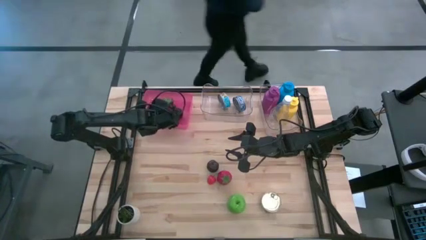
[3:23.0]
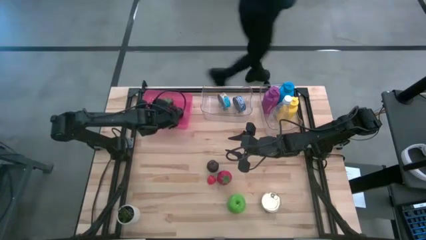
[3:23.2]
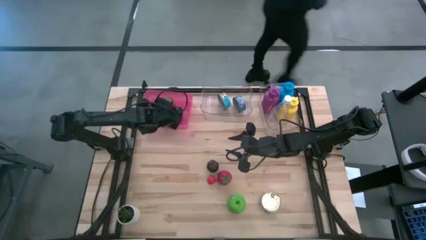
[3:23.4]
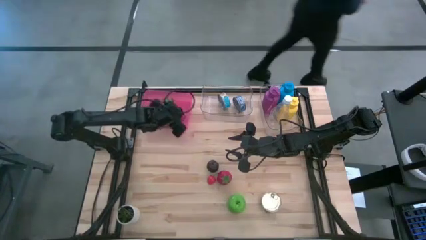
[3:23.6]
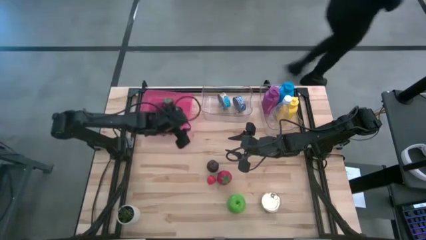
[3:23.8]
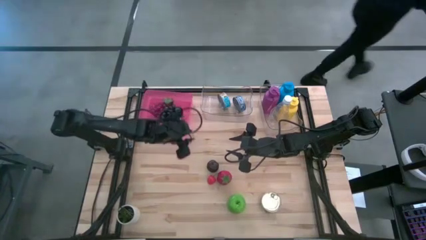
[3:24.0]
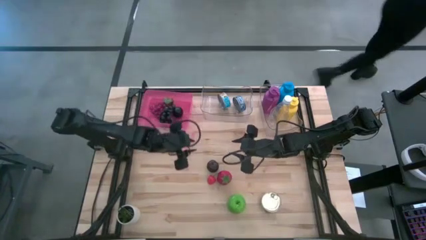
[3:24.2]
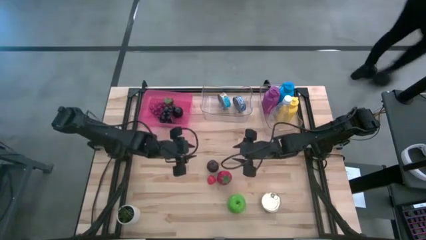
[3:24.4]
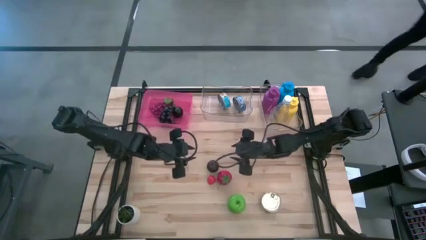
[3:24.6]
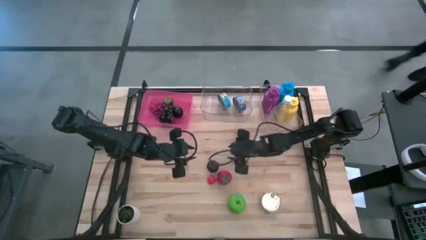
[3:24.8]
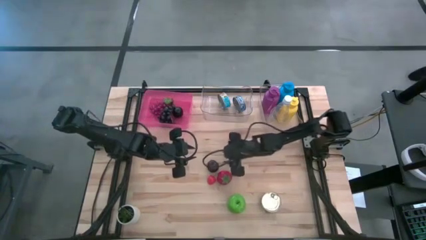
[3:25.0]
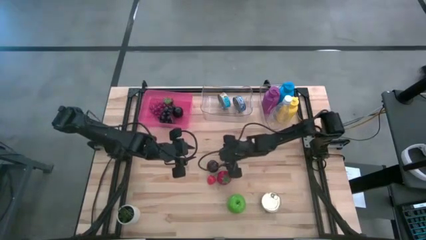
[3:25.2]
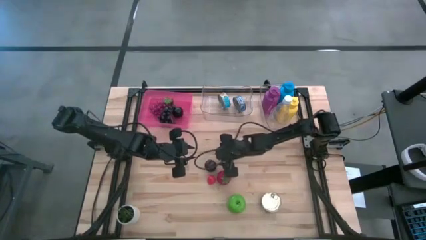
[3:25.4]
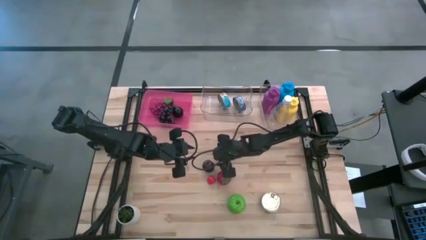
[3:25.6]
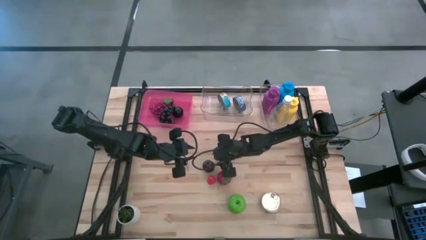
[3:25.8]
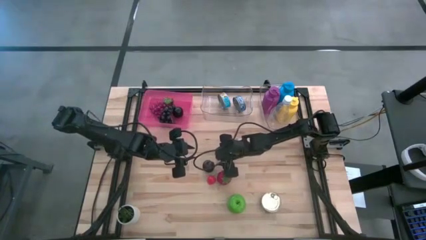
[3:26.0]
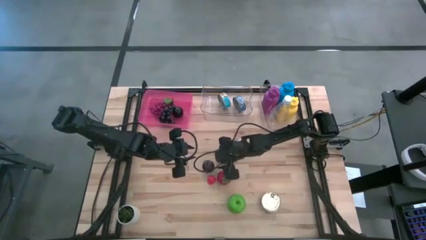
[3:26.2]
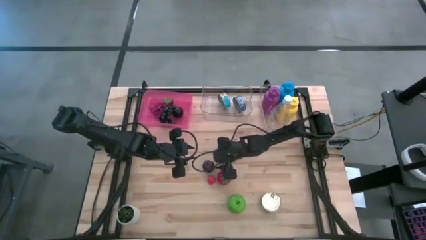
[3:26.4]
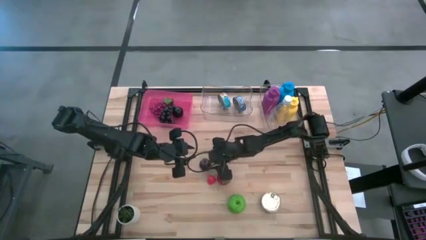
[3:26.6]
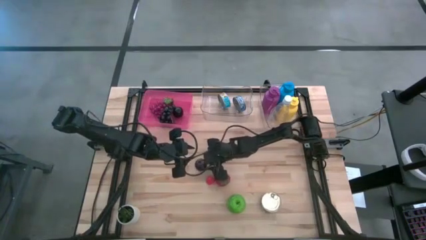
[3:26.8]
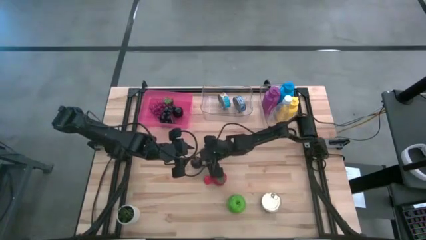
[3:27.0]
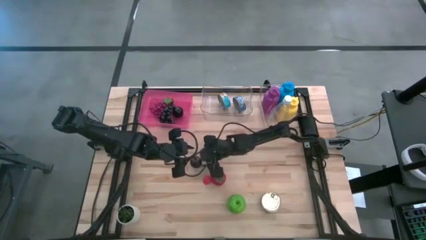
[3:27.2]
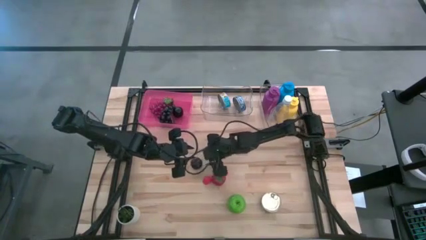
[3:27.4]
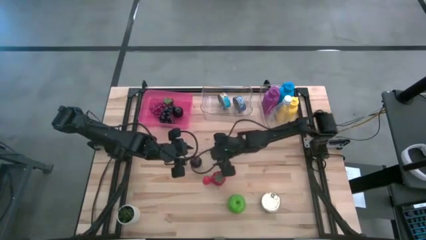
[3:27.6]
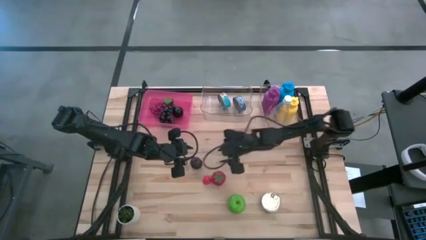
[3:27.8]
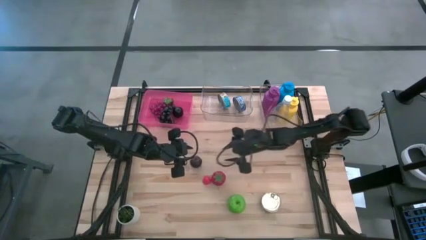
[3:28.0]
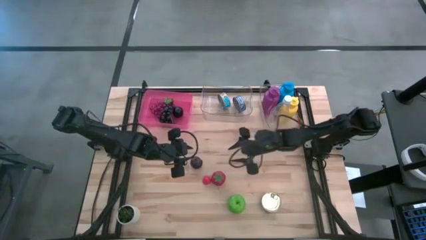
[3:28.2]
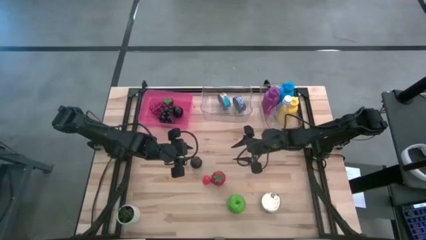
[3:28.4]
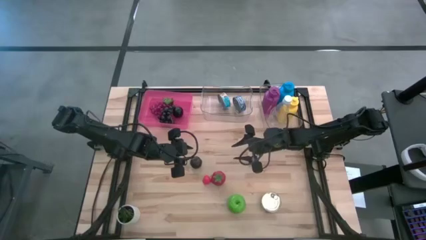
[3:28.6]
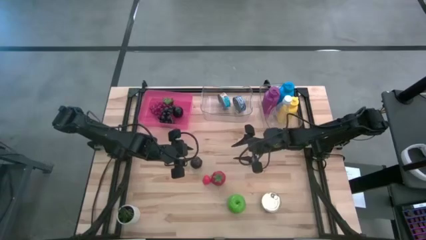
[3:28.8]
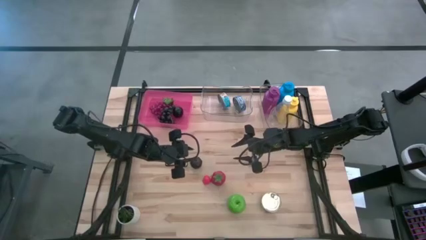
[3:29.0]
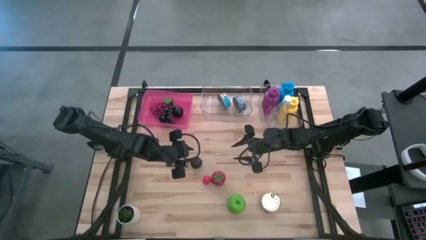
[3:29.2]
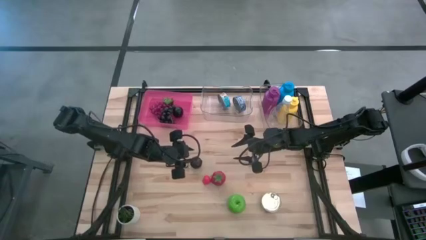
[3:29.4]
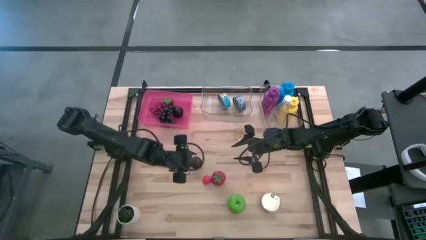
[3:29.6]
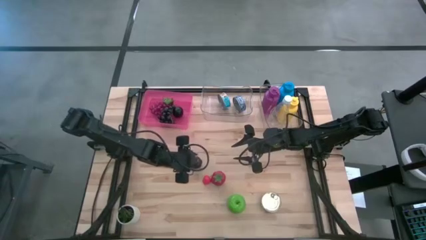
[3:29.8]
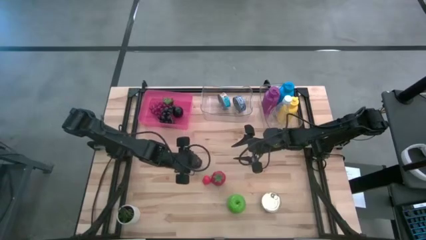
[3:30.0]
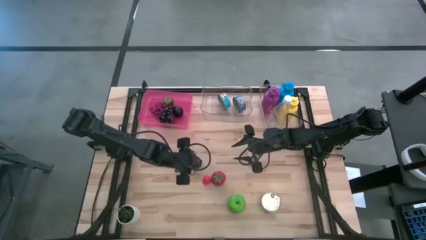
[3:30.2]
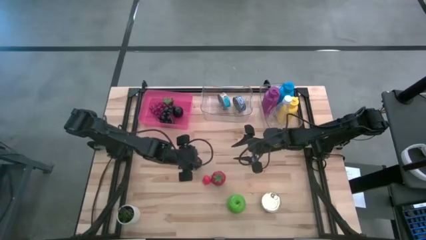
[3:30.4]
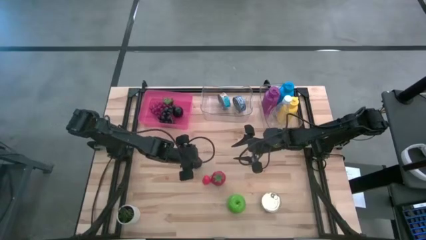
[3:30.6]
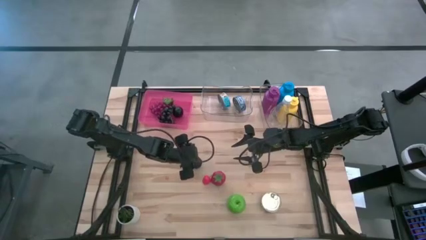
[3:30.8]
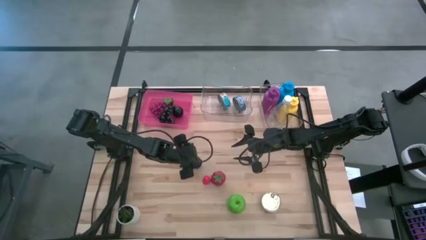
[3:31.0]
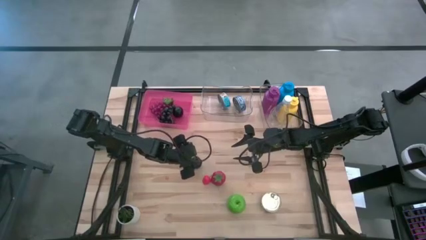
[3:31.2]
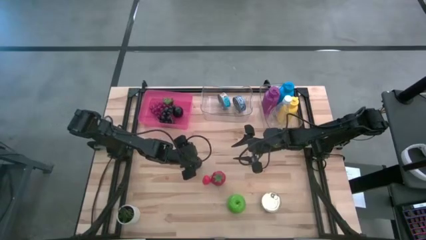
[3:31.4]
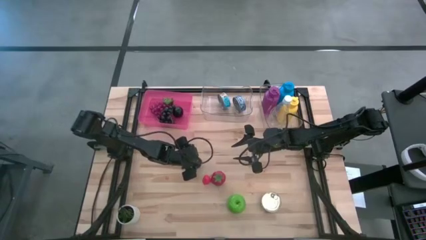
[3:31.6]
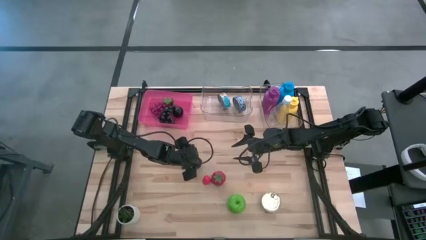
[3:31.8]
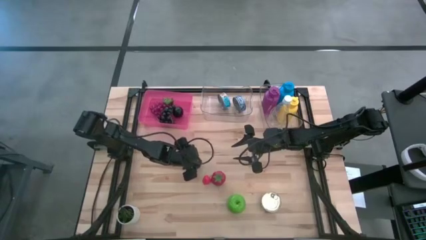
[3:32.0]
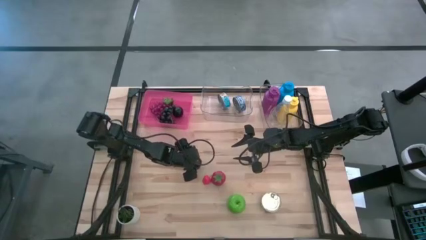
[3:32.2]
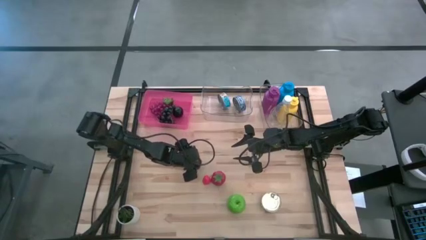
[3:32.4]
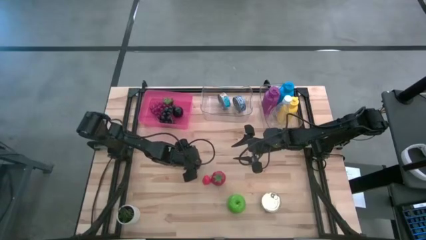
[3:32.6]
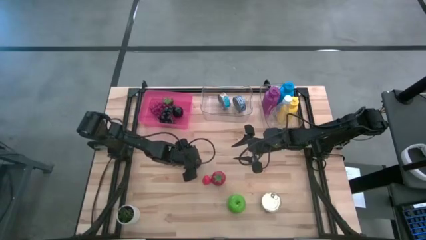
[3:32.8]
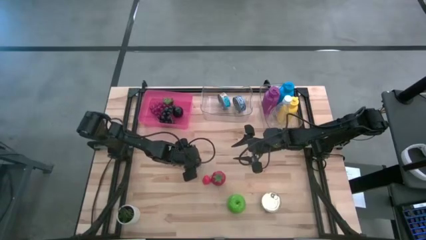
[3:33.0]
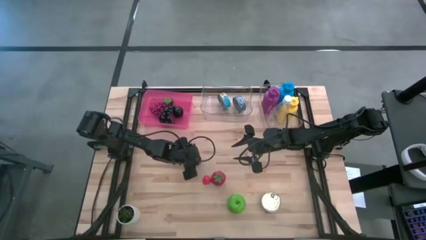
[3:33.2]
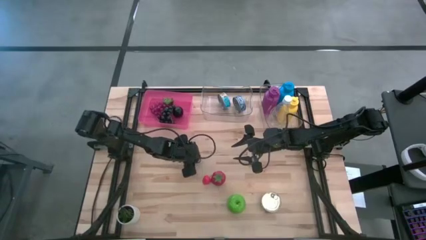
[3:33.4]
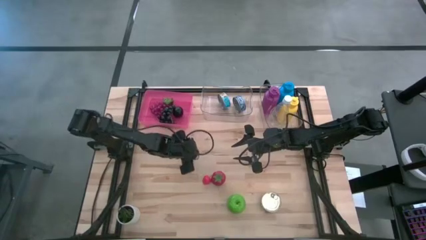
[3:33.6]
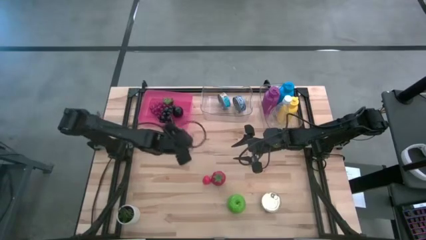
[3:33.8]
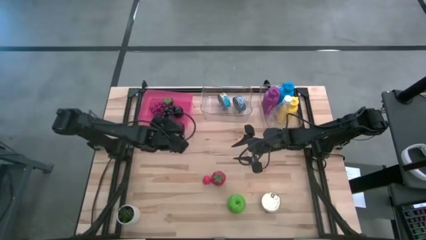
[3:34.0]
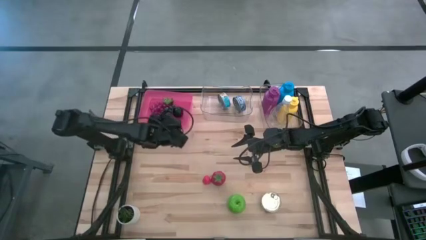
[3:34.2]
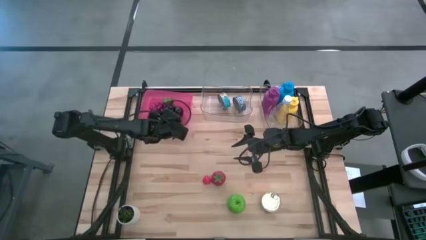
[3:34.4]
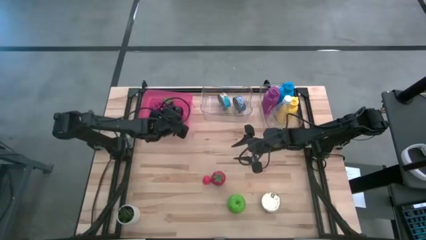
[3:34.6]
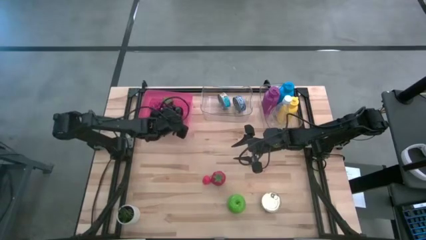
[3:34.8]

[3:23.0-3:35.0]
Task: Pick & Place Food Item
Put the plum into the pink bin

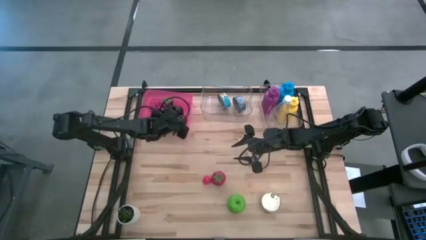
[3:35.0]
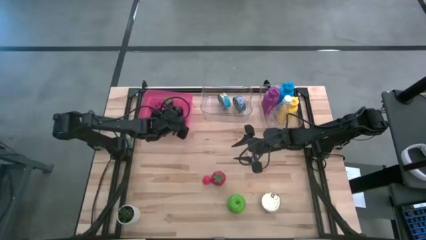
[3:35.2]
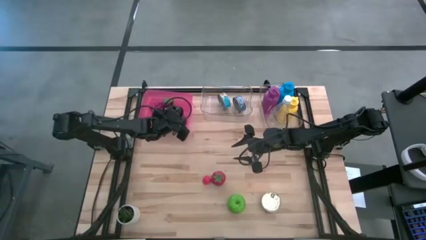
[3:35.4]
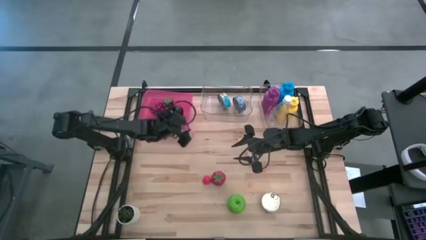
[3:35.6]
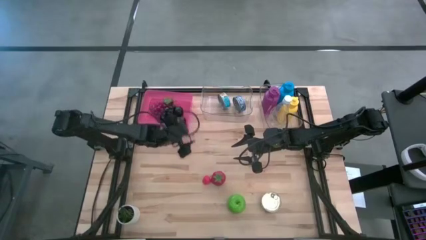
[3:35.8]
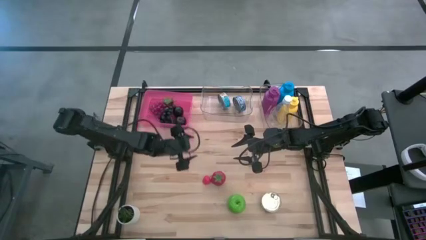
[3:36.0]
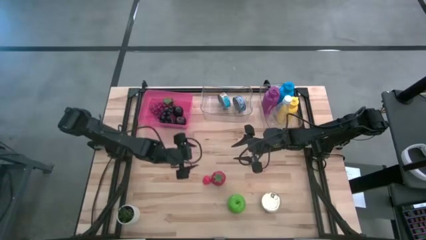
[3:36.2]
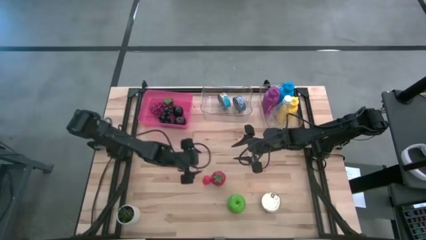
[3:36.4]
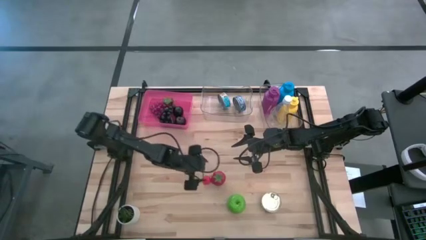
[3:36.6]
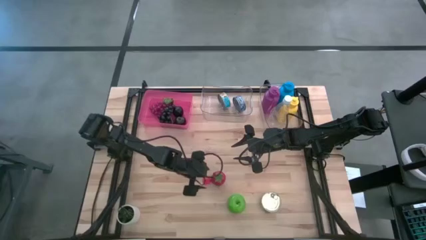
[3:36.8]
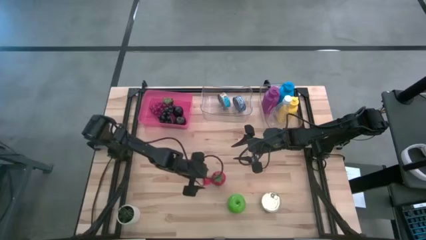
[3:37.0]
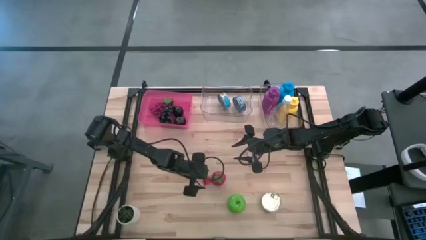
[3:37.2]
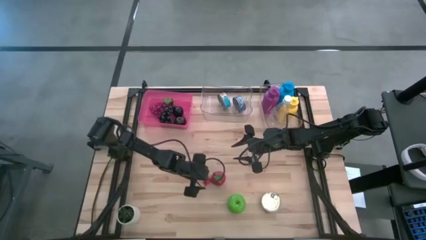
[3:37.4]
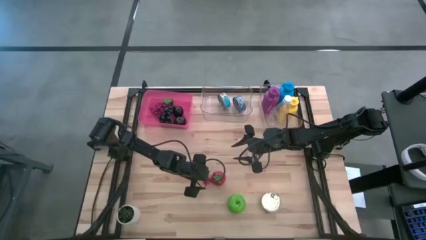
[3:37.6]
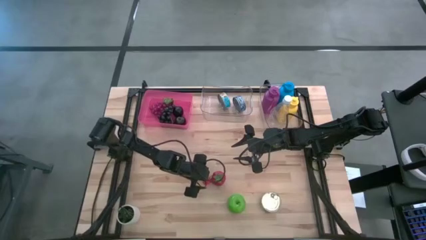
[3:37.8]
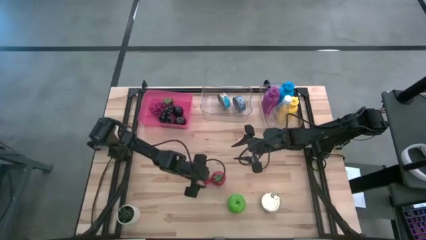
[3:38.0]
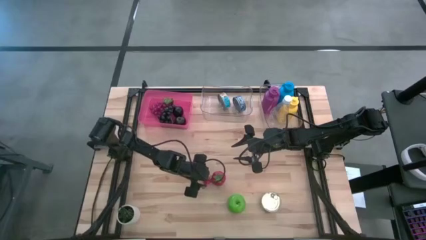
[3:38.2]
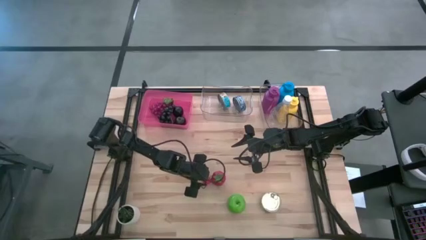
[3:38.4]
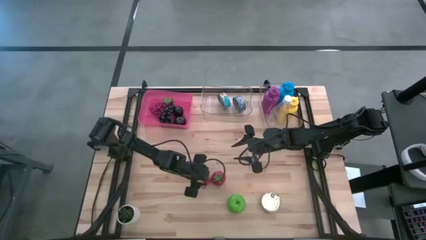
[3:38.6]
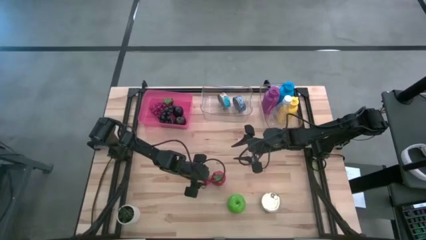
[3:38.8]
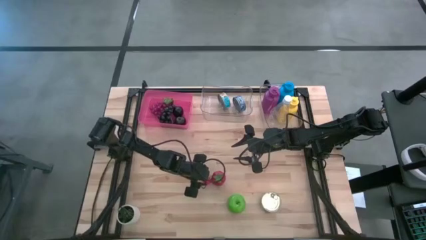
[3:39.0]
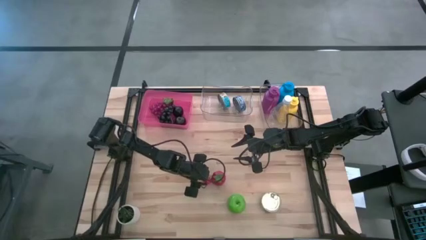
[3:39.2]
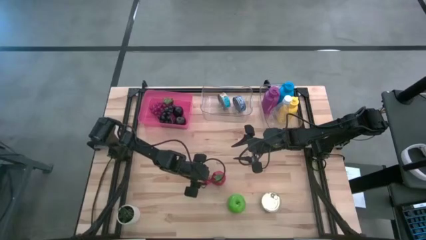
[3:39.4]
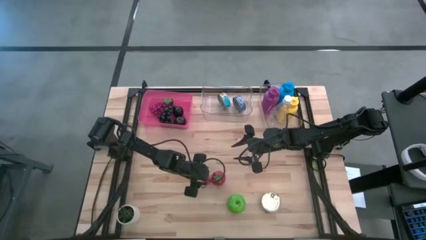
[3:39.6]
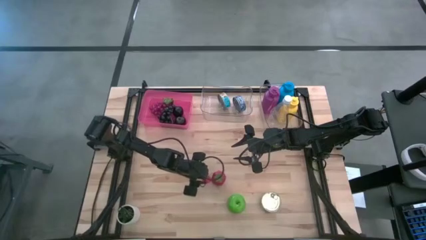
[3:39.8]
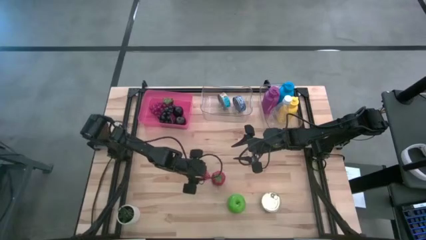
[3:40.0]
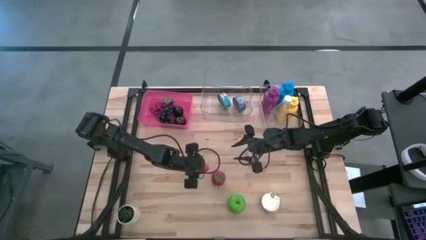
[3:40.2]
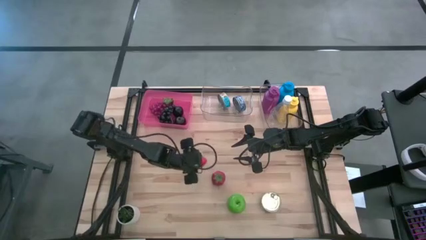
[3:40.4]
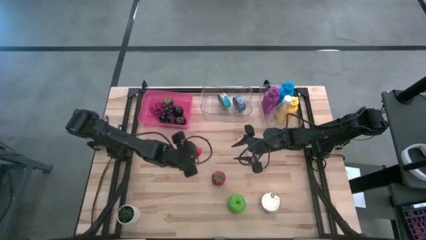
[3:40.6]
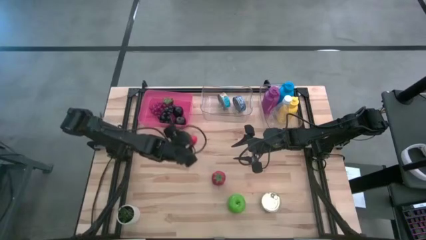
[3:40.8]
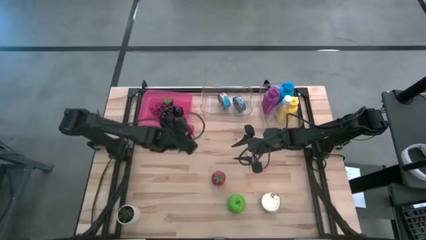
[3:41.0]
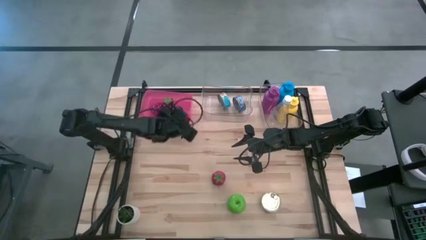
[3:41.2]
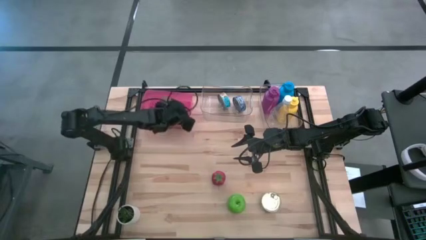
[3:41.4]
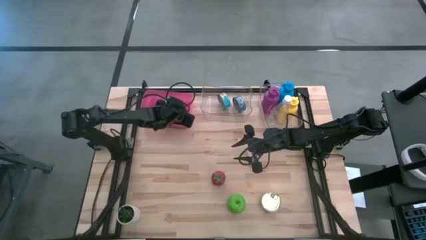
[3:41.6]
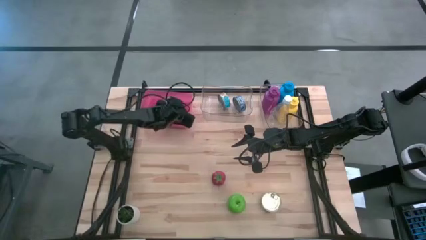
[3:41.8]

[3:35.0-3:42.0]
Put the strawberry into the pink bin
